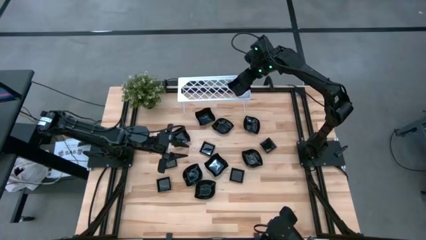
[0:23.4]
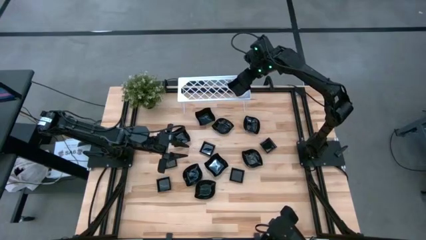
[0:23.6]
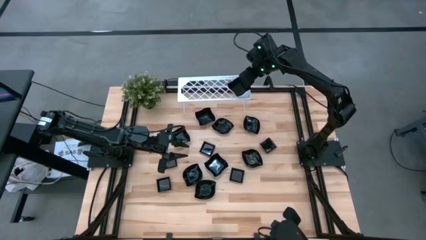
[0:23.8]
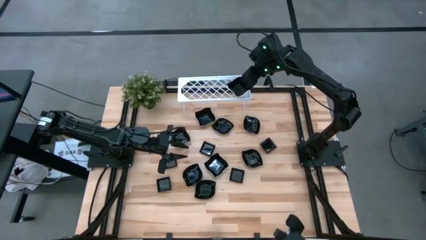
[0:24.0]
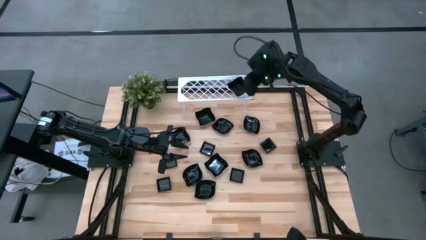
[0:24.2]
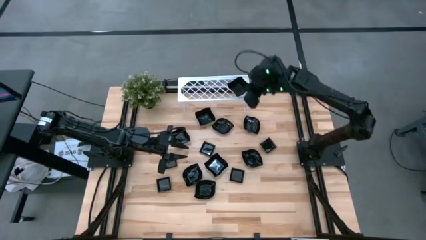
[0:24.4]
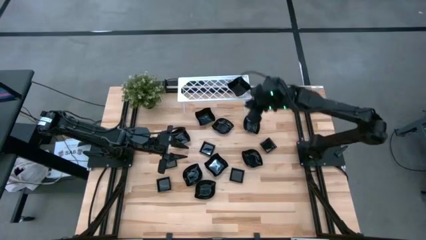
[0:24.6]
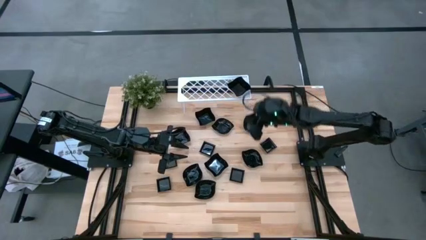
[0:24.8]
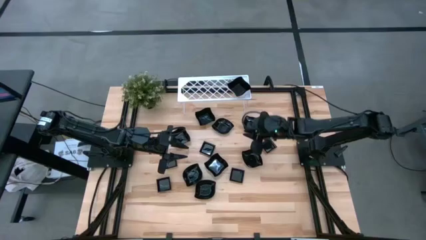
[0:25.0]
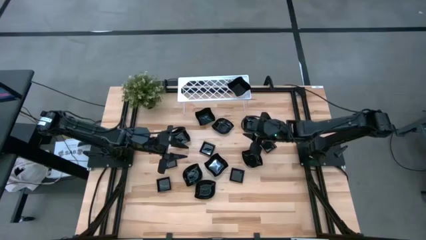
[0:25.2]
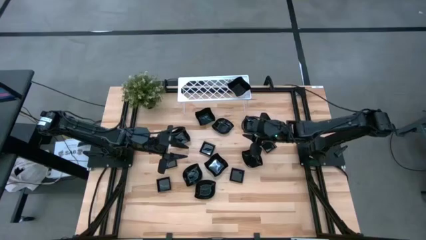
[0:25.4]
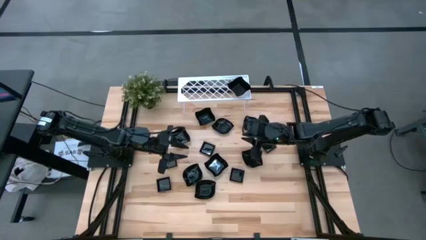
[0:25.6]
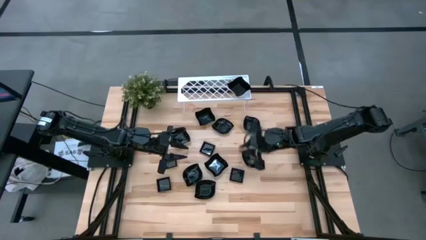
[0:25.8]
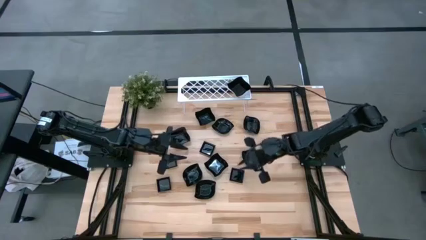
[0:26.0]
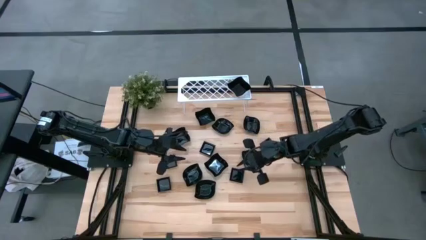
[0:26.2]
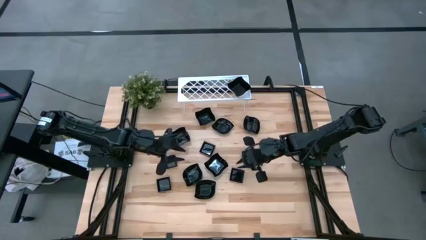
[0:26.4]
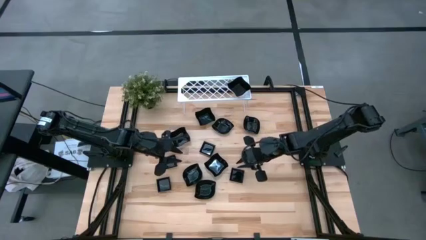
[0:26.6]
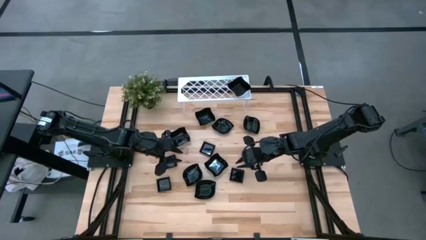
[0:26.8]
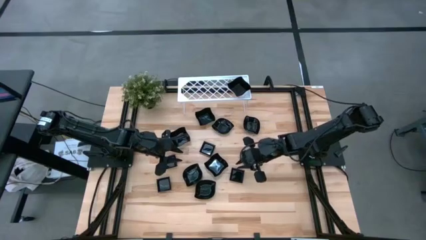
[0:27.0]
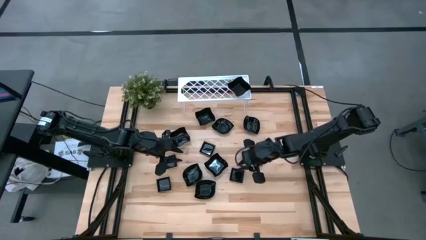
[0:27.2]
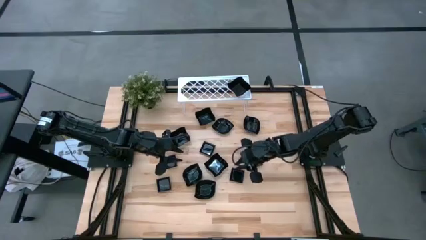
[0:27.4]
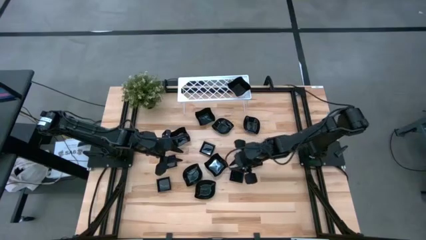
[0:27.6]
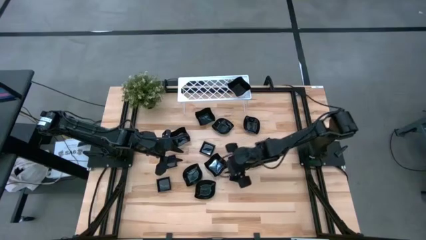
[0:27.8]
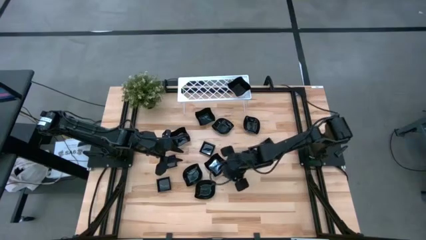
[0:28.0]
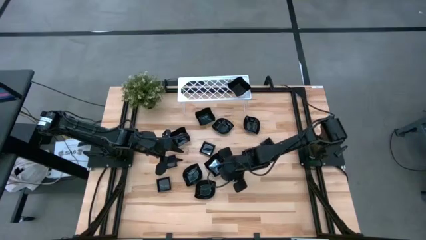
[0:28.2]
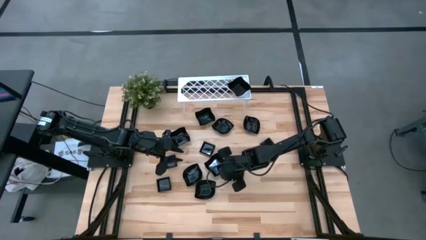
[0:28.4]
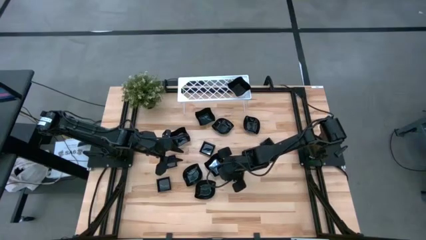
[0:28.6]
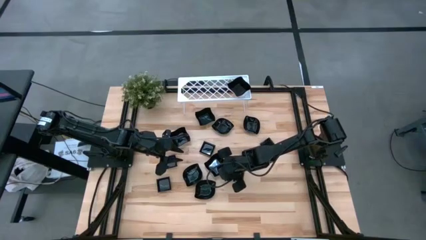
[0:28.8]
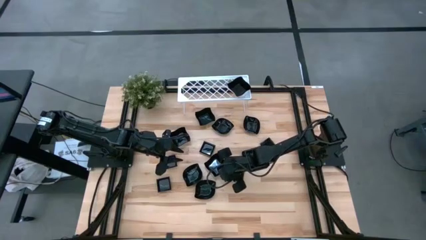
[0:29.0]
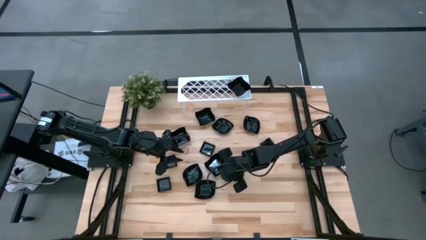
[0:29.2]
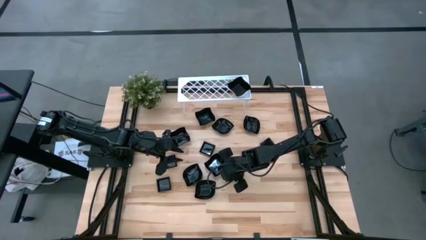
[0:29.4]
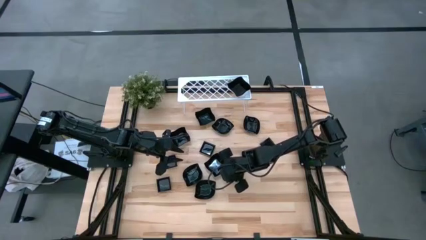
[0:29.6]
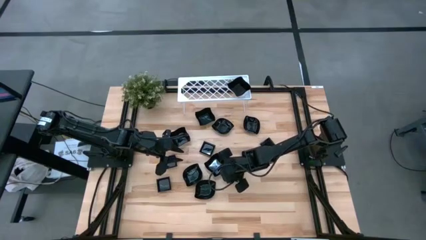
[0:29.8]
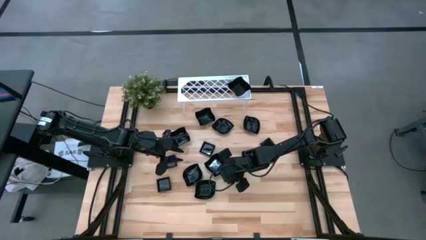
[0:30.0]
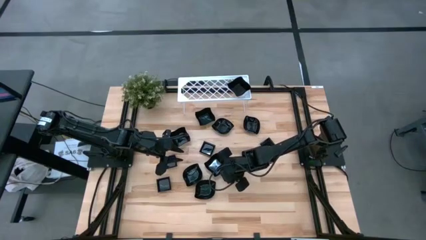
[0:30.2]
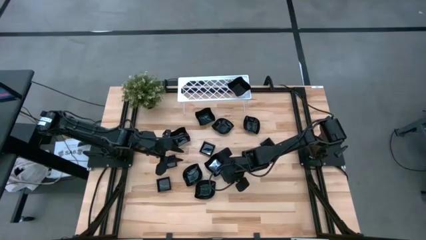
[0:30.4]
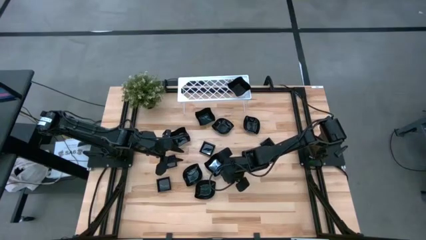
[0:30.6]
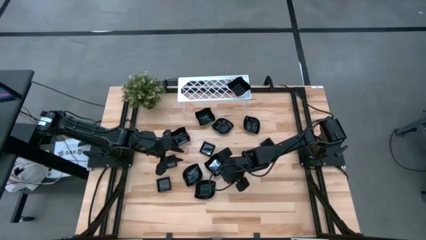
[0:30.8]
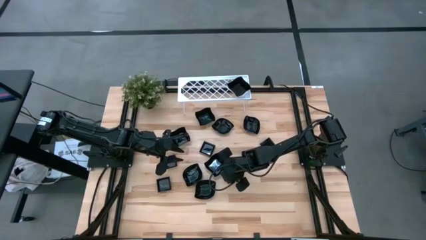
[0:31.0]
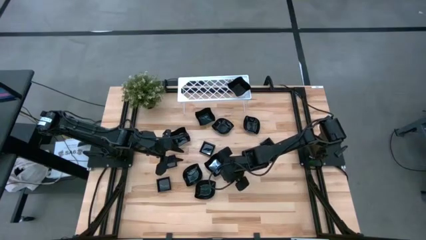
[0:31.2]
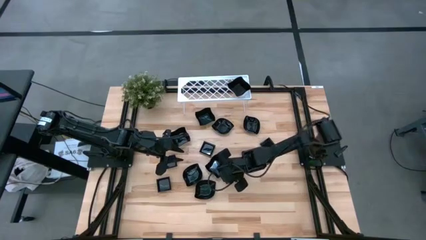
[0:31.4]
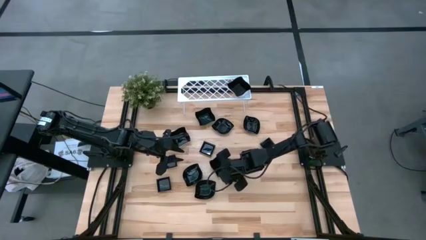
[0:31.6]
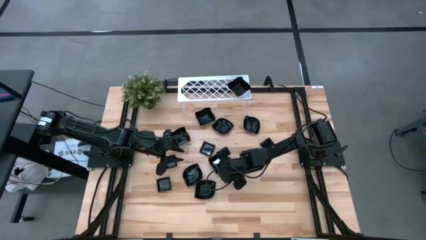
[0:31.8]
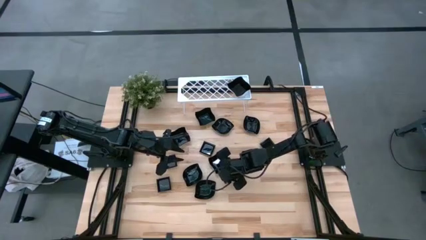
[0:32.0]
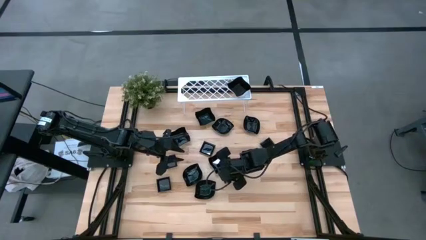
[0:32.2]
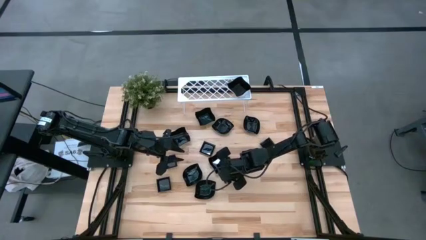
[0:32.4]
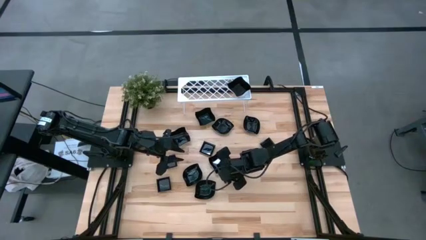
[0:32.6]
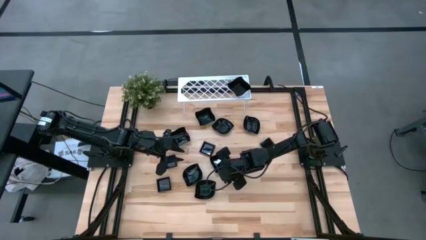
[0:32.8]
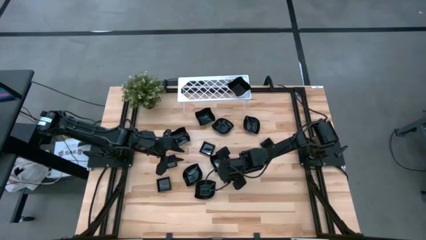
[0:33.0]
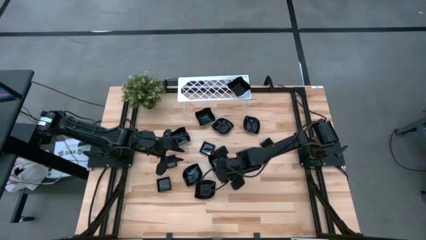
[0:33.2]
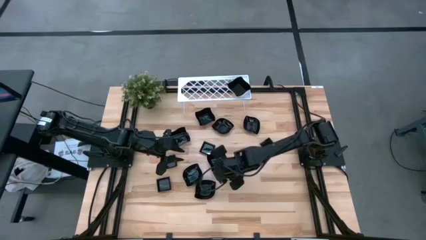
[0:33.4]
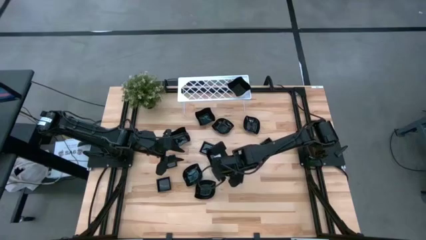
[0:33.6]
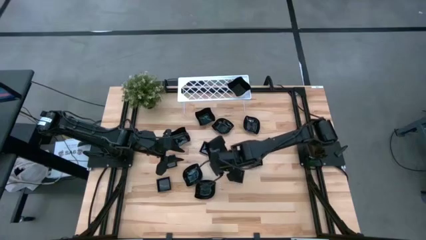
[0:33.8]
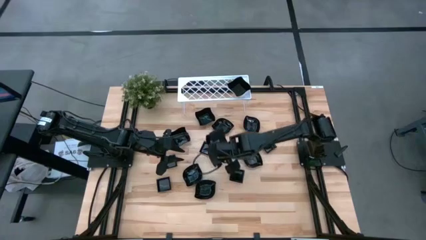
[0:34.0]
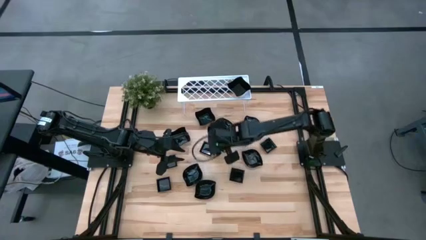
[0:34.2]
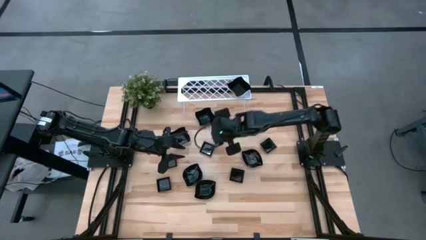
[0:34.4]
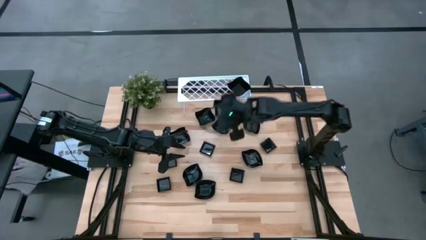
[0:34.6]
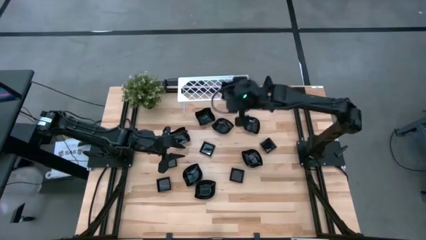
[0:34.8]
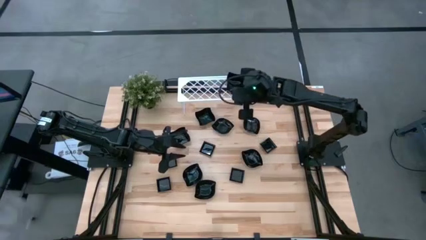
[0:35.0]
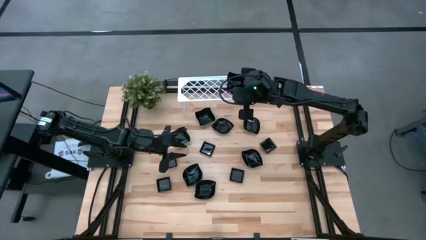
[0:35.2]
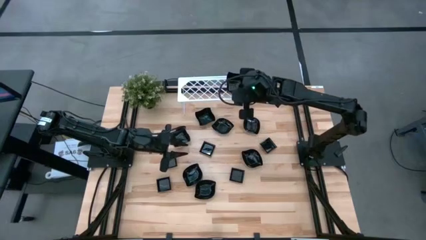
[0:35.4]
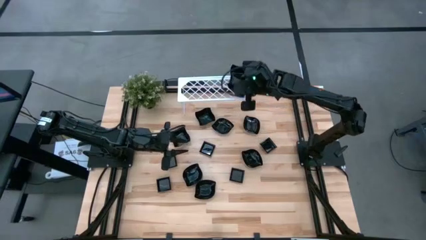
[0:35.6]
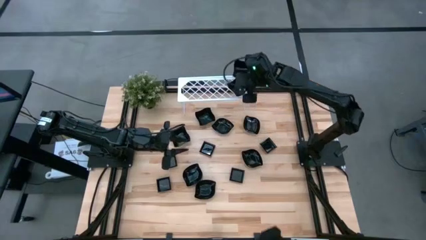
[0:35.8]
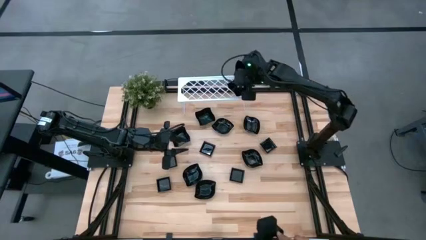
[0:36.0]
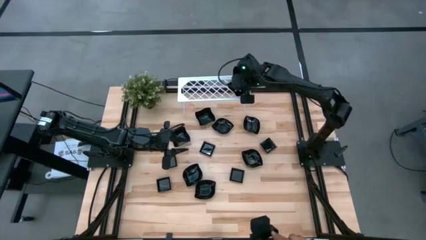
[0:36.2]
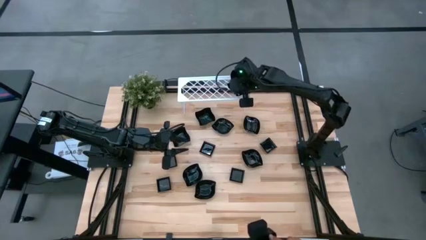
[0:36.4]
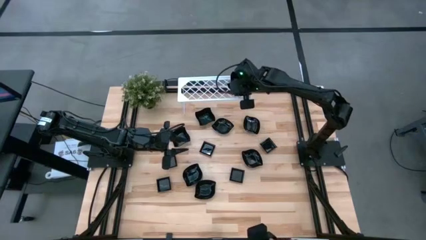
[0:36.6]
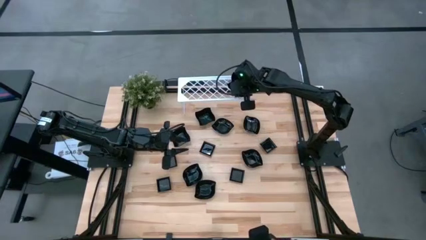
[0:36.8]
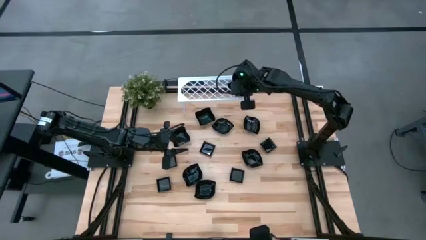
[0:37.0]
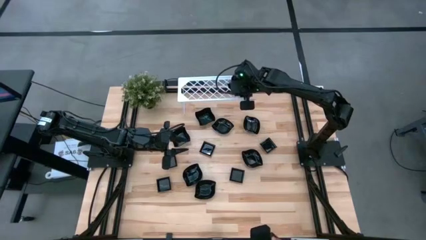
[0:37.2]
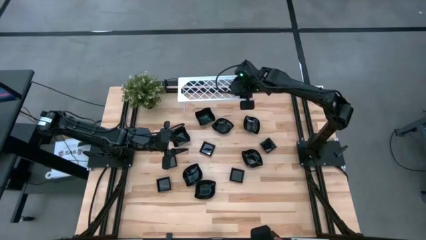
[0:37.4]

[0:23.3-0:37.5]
Task: Pick & Place Mini shaped plates
Stack the black distorted square plate on top of the black distorted square plate on the shelf
